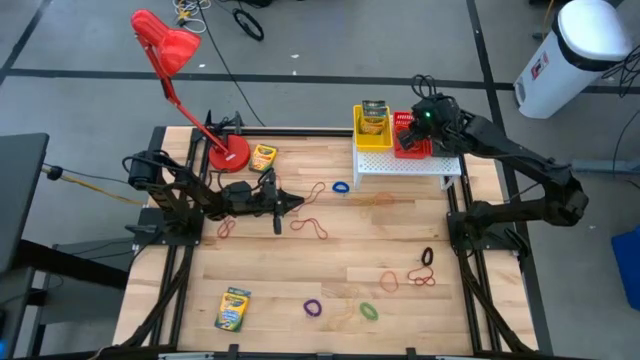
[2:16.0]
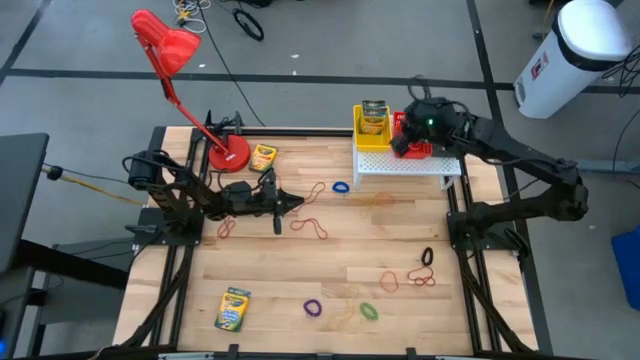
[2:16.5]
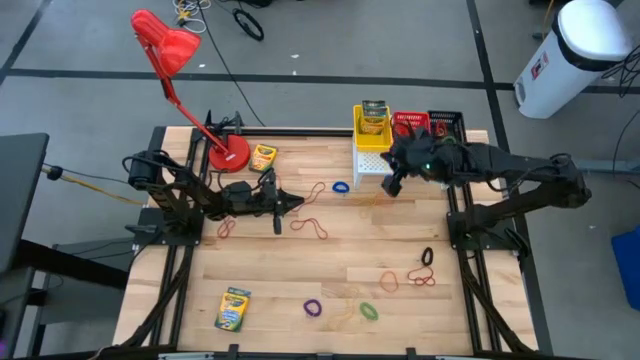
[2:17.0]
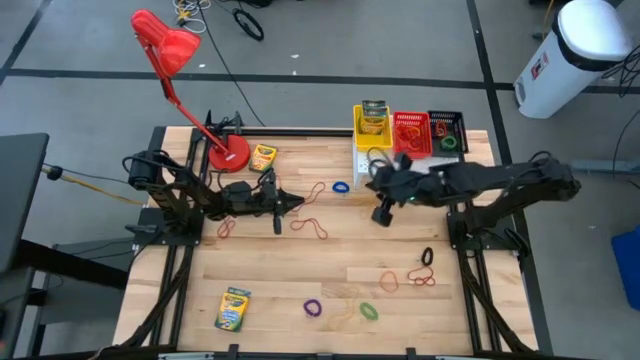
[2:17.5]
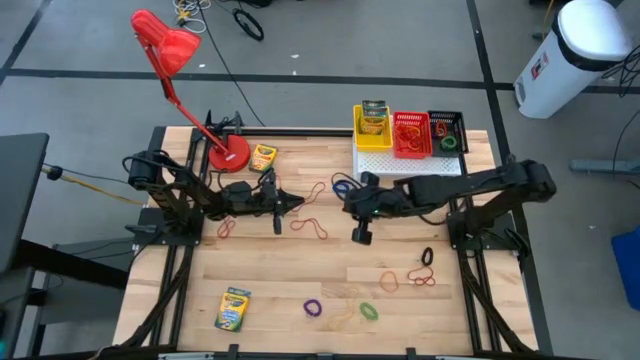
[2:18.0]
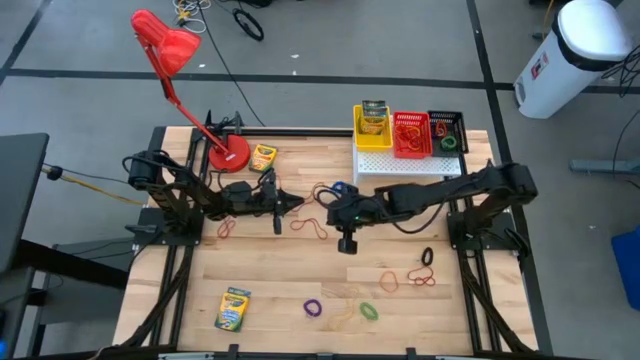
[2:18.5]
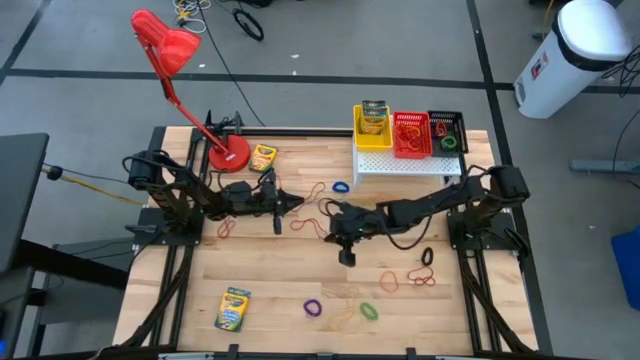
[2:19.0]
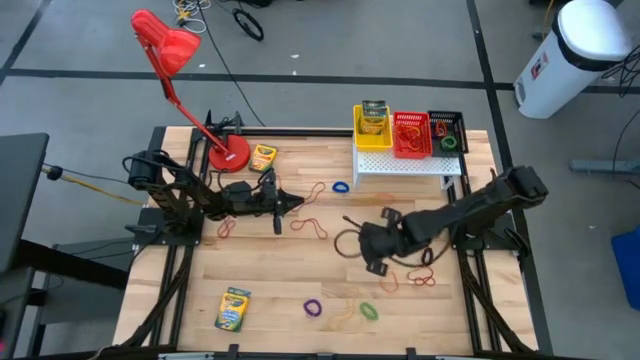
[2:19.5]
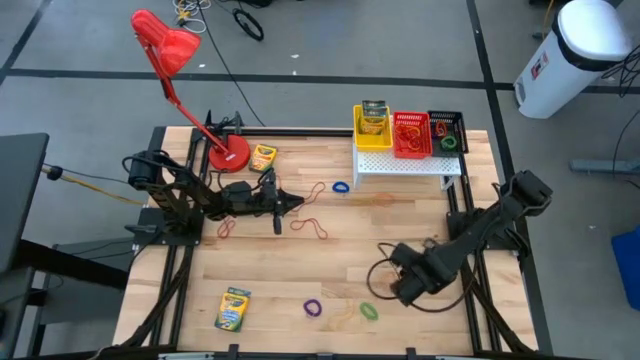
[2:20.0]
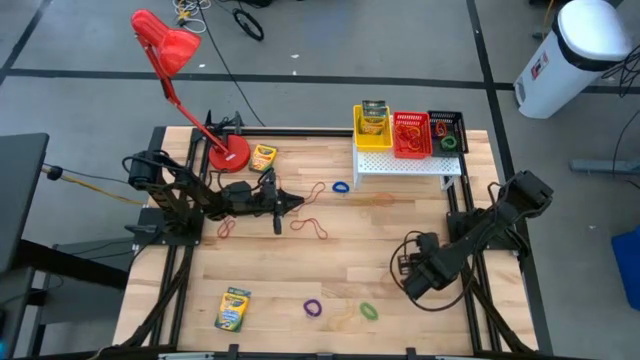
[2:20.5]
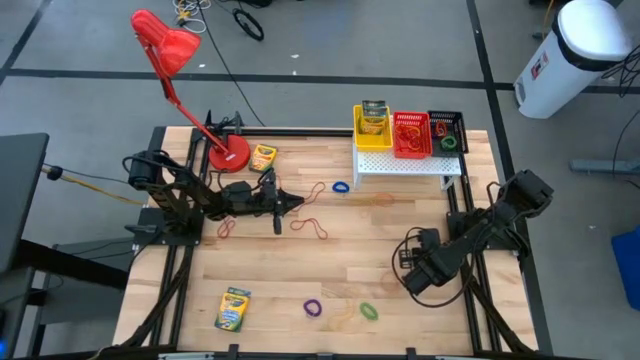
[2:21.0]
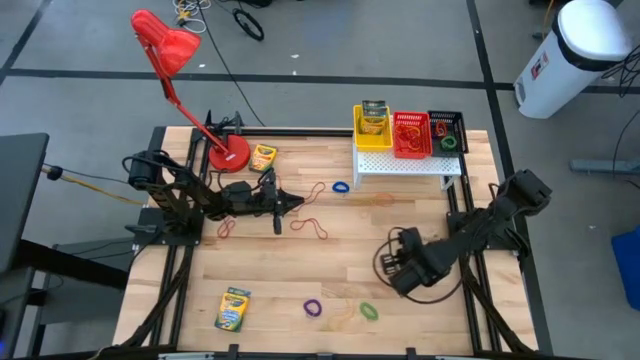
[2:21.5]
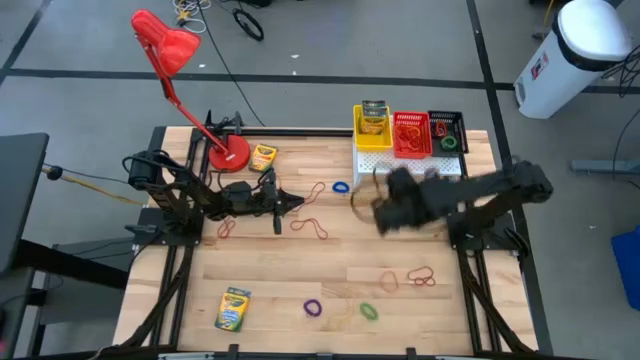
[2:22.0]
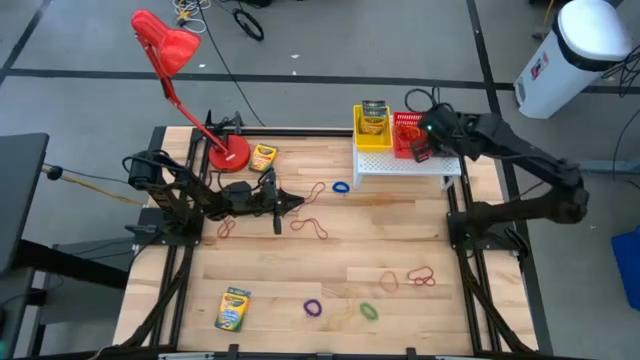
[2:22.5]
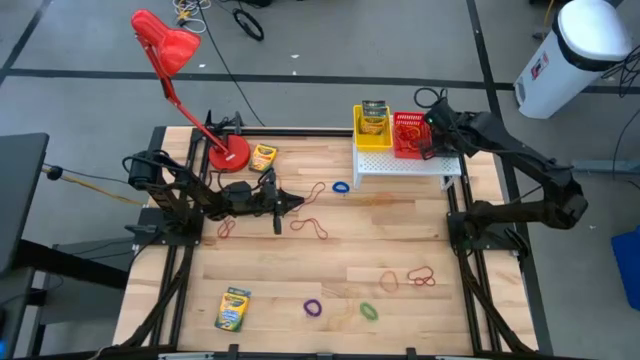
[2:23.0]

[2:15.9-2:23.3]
Task: Pick & Place Office Desk Supplies
Put the black spring keychain on the black basket

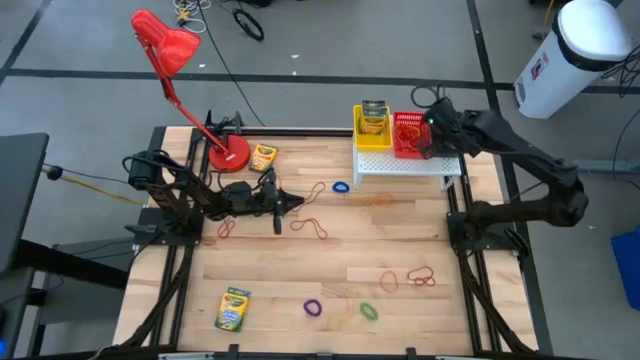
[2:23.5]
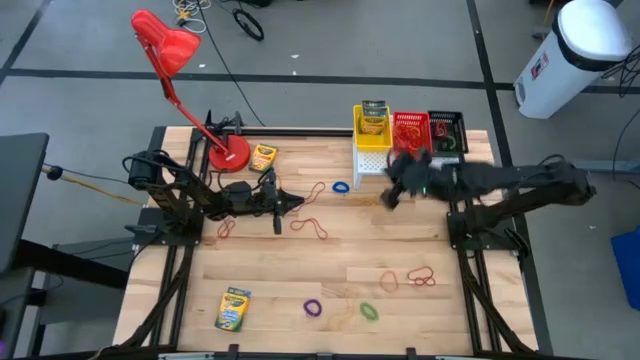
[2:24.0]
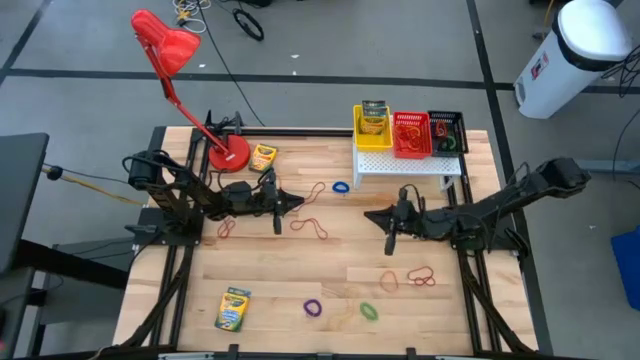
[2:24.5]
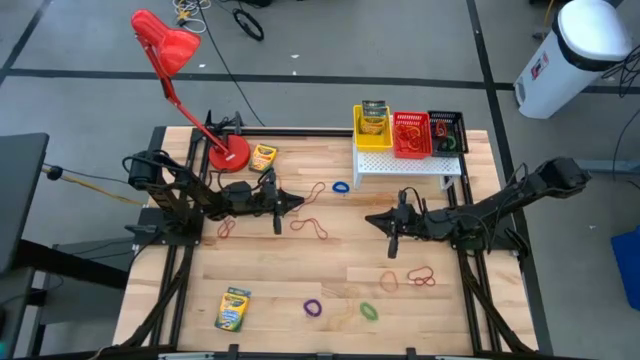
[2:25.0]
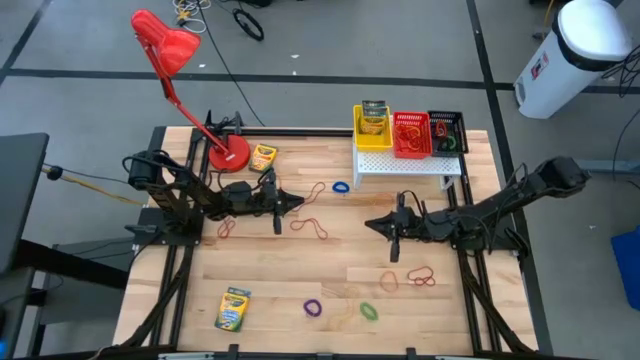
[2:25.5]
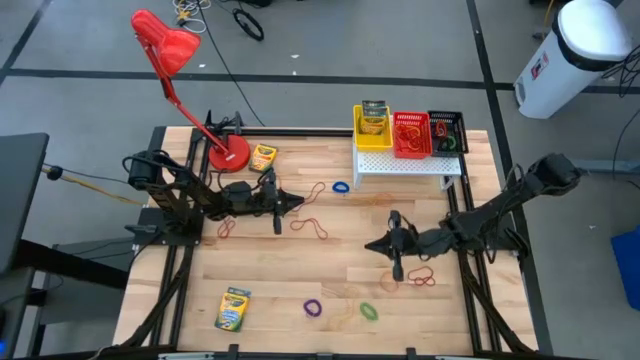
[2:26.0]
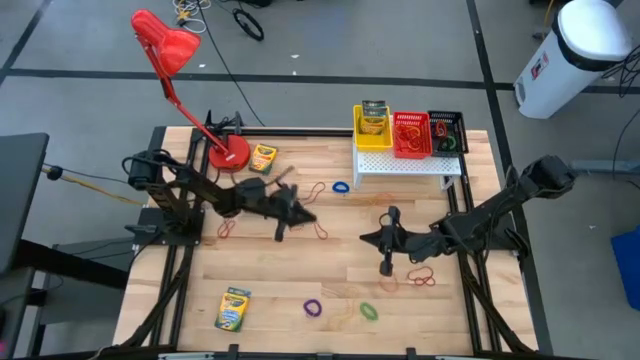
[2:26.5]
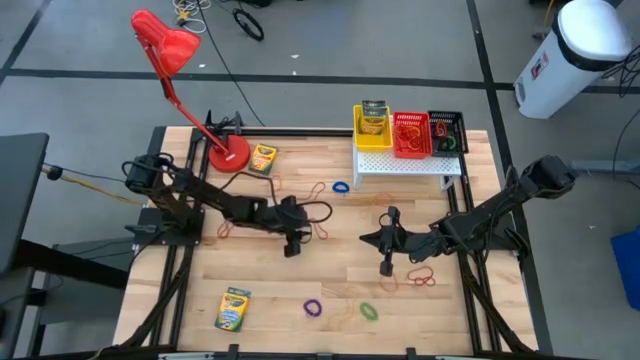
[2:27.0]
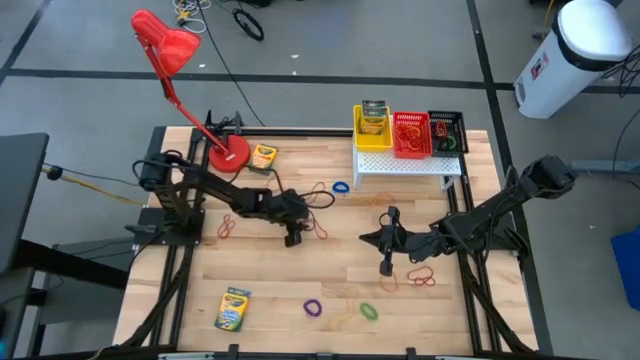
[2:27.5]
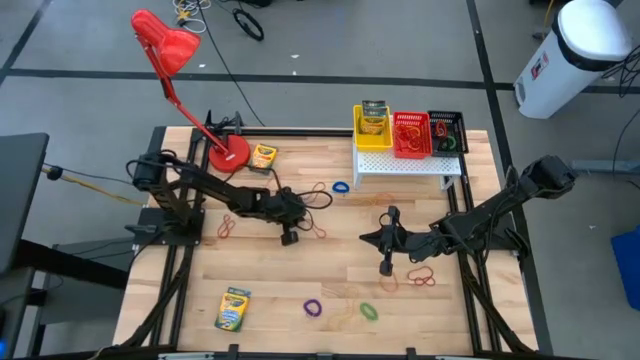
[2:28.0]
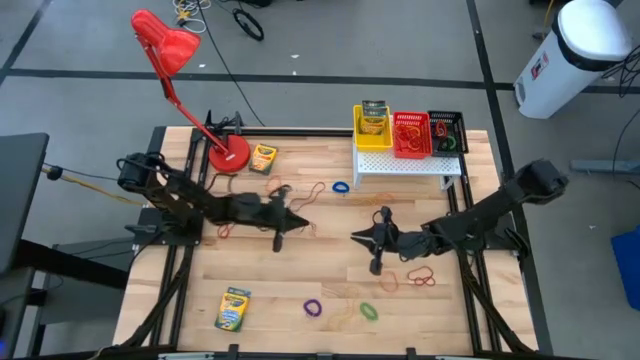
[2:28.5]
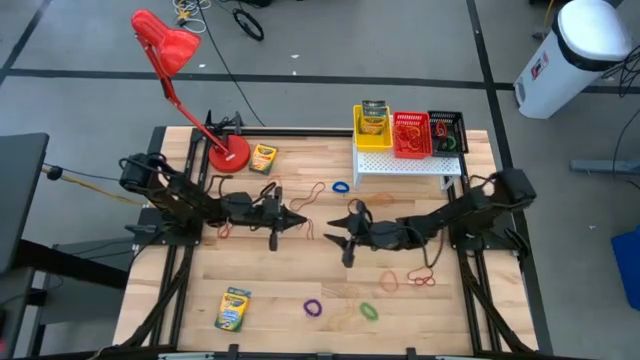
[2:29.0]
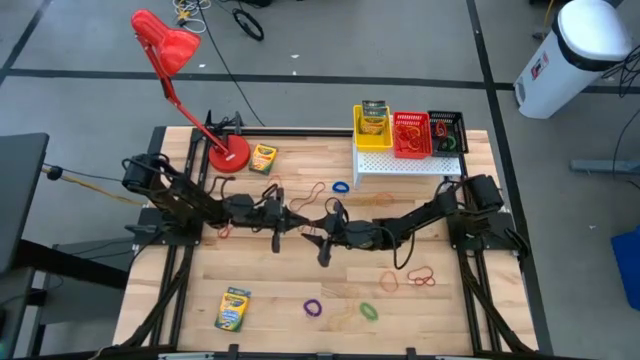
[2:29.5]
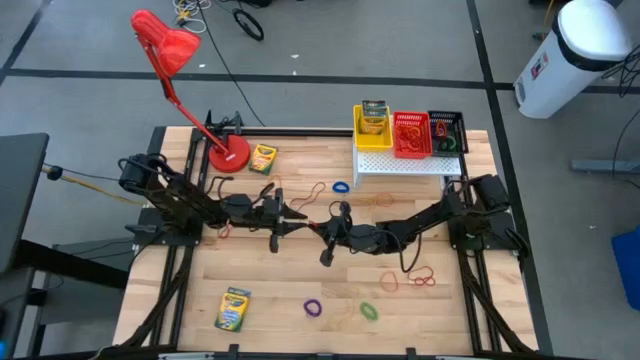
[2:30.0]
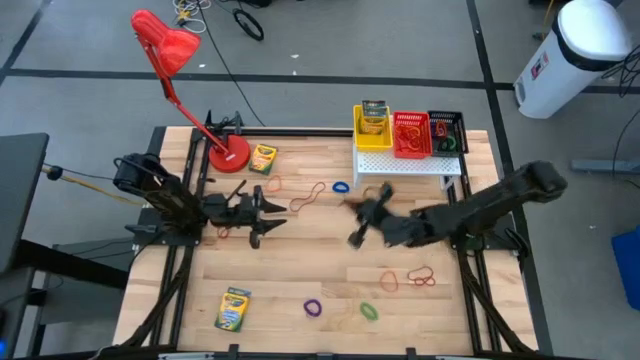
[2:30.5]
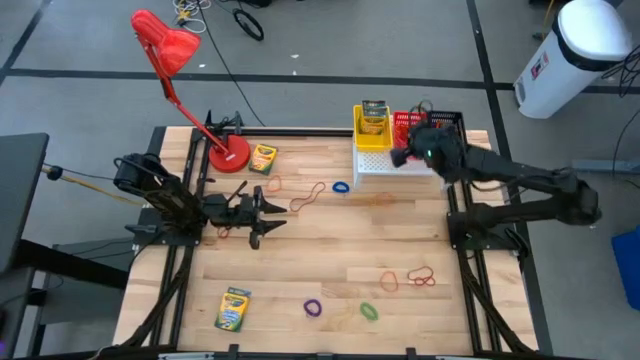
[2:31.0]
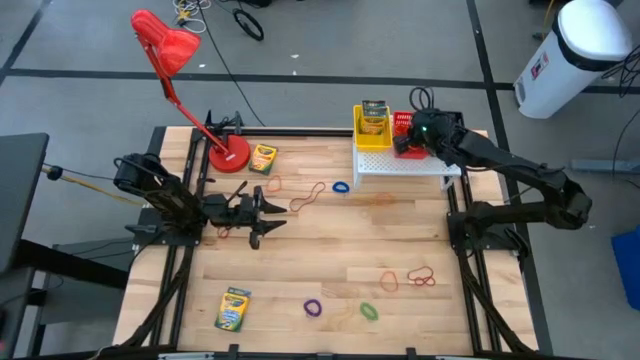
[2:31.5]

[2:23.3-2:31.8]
Put the red rubber band on the red basket

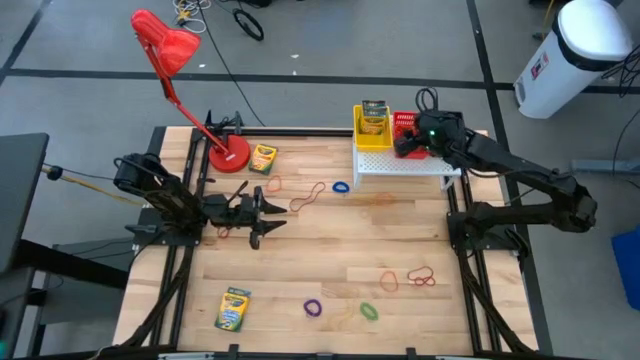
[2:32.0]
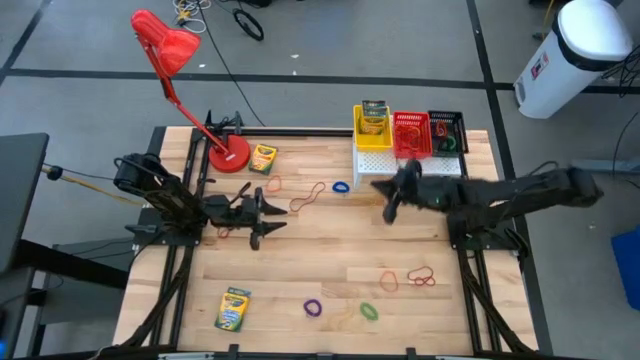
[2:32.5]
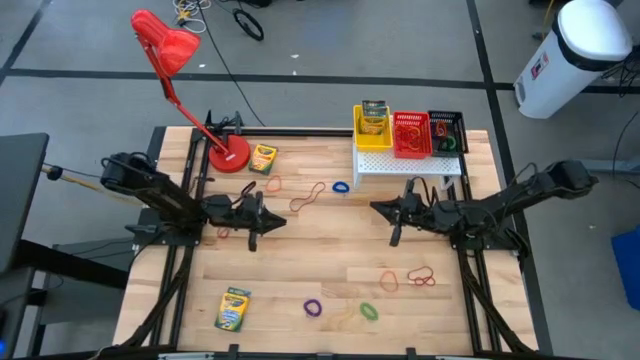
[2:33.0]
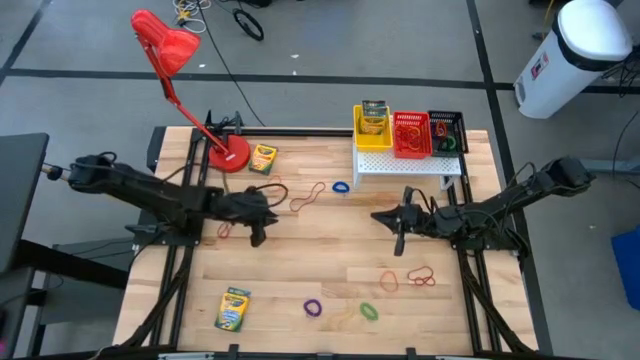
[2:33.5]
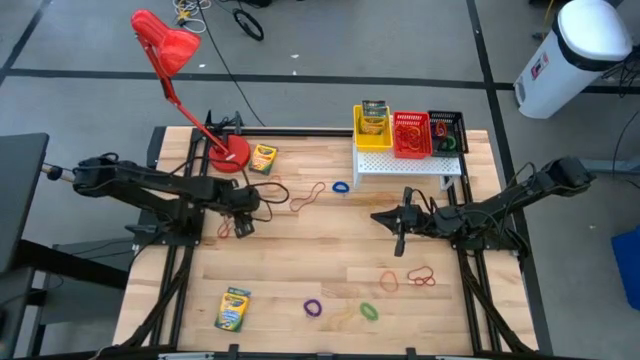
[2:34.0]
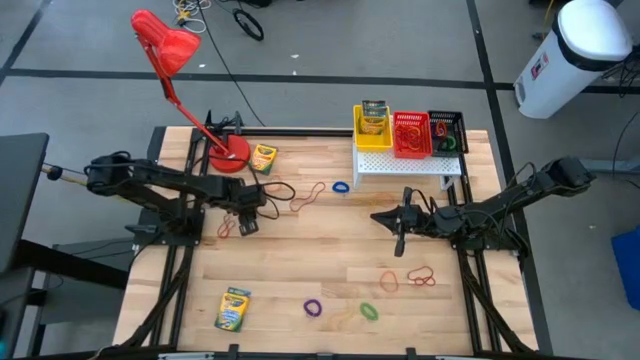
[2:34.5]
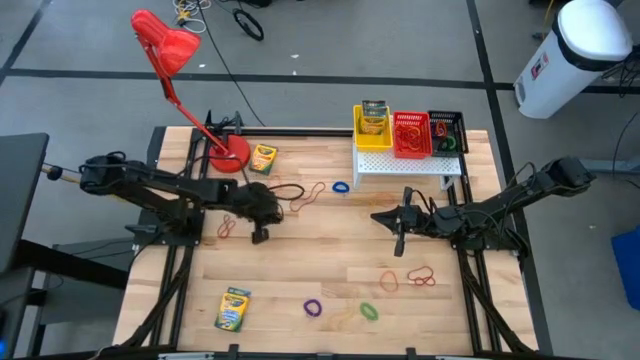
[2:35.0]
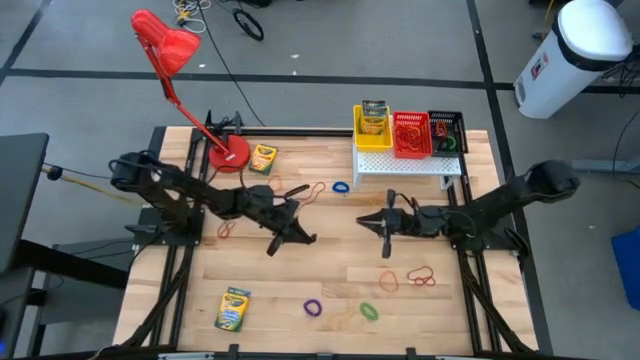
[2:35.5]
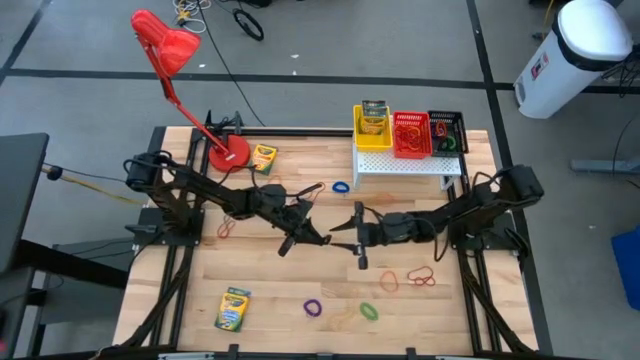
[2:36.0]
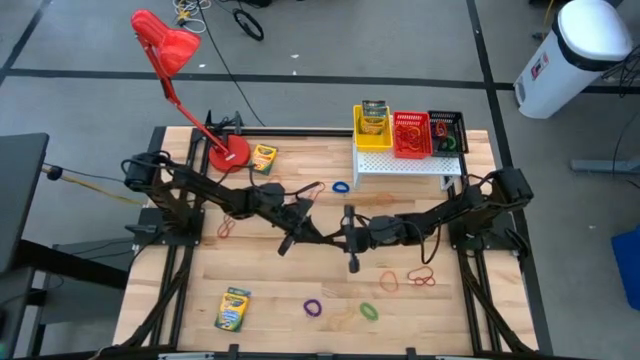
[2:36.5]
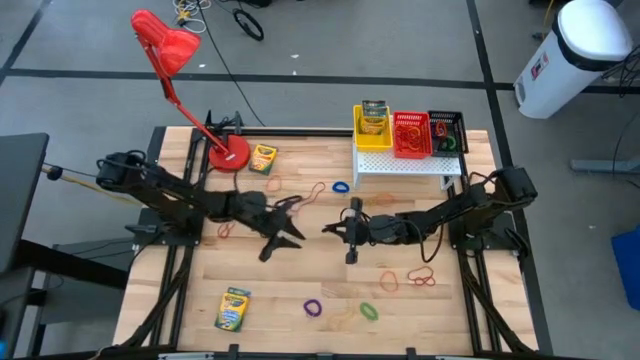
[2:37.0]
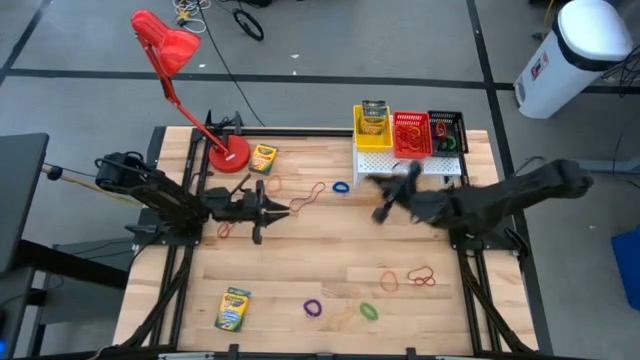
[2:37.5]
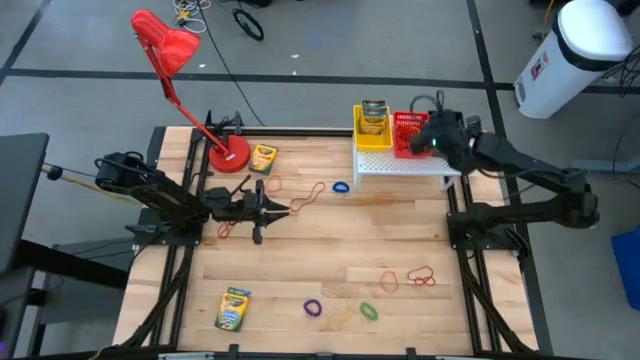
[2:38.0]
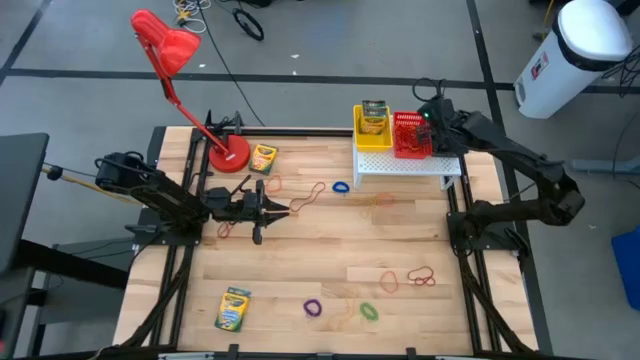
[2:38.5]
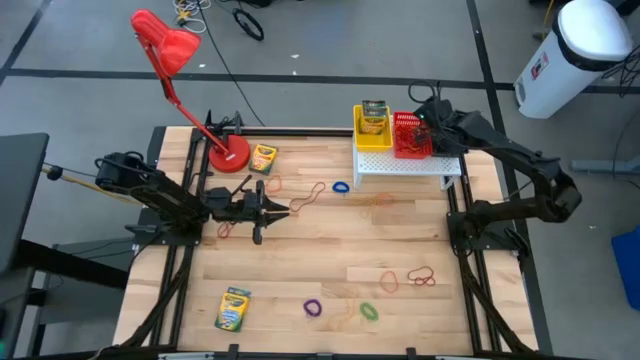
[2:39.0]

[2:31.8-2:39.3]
Put the black spring keychain on the black basket
